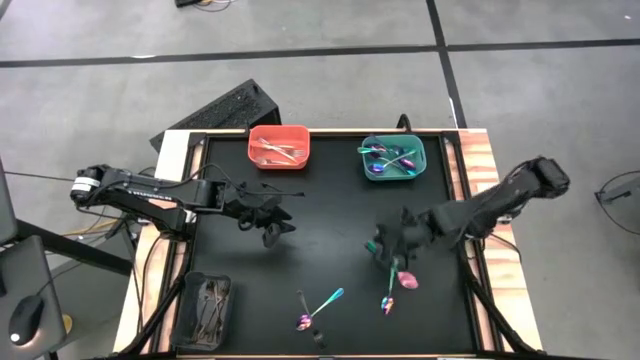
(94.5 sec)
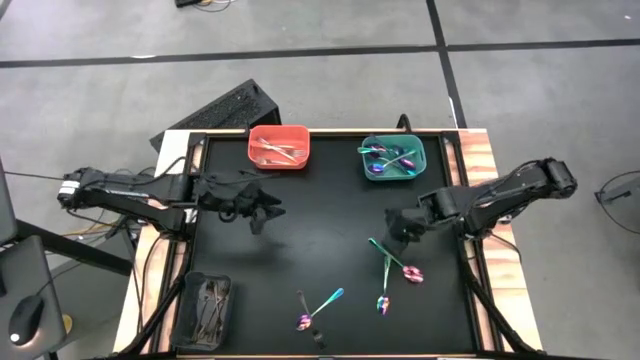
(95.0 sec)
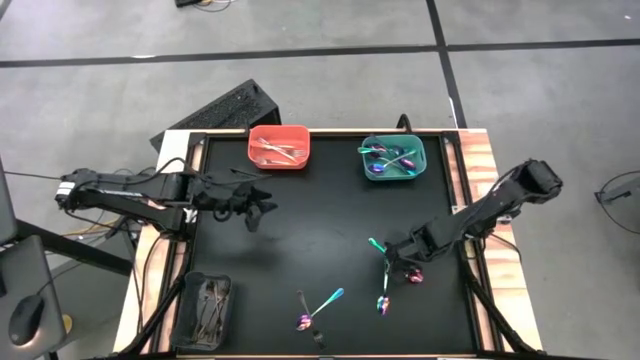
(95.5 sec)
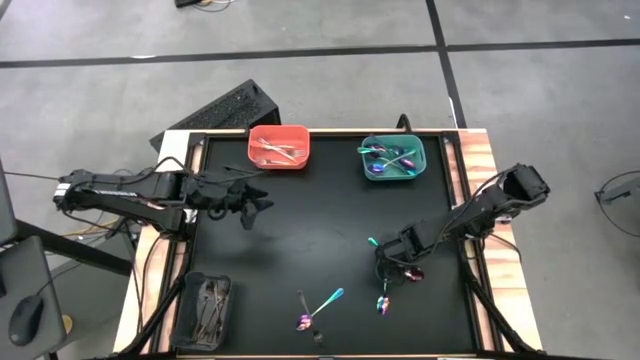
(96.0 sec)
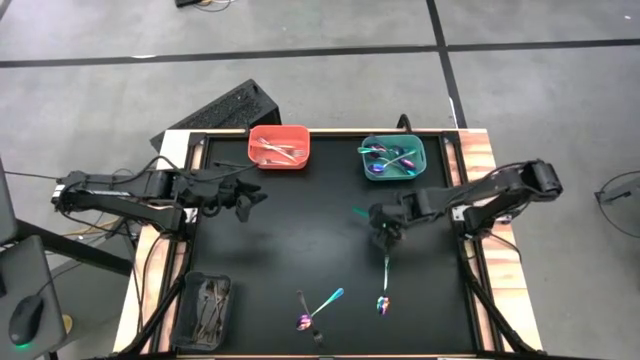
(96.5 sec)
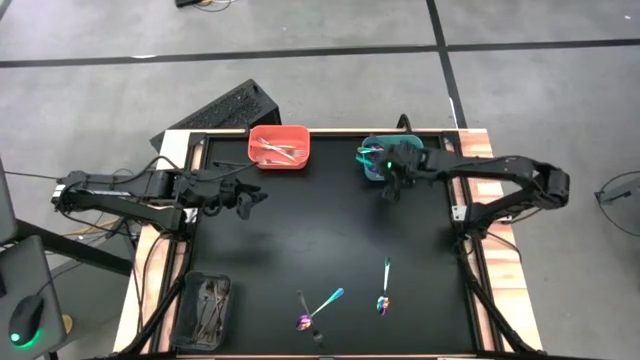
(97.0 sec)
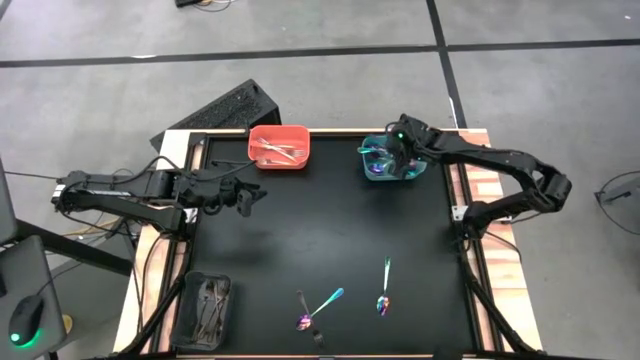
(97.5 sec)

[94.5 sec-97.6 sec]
Task: Sort silverware by color (type)
Put the blue spoon into the blue bin

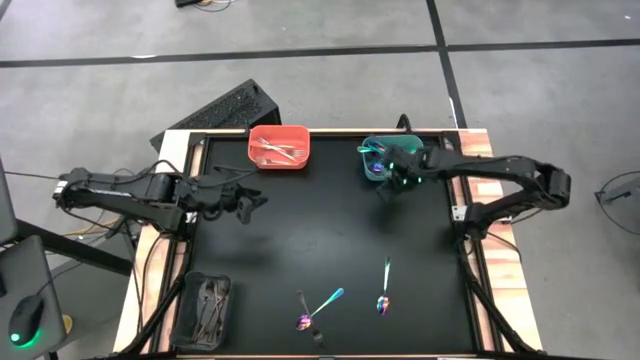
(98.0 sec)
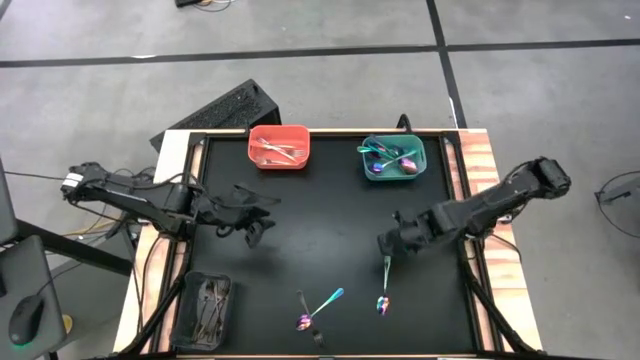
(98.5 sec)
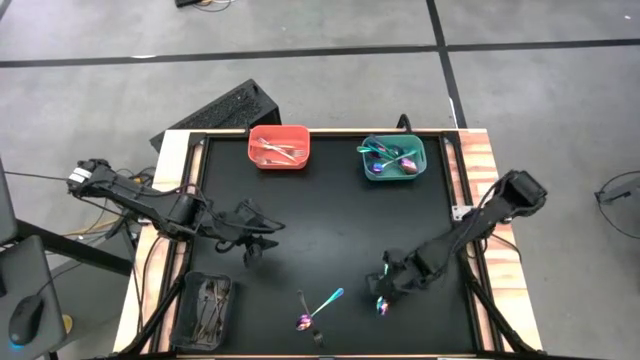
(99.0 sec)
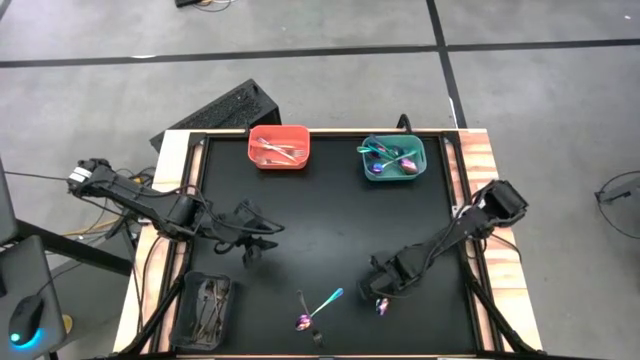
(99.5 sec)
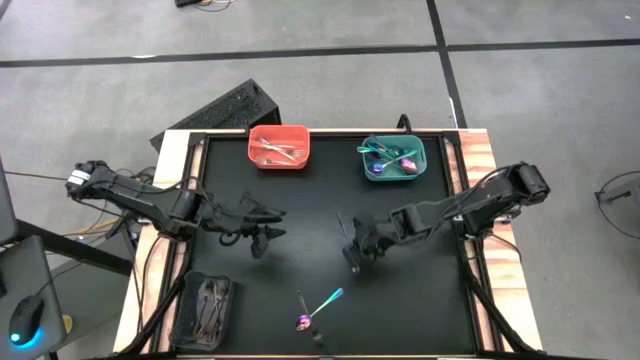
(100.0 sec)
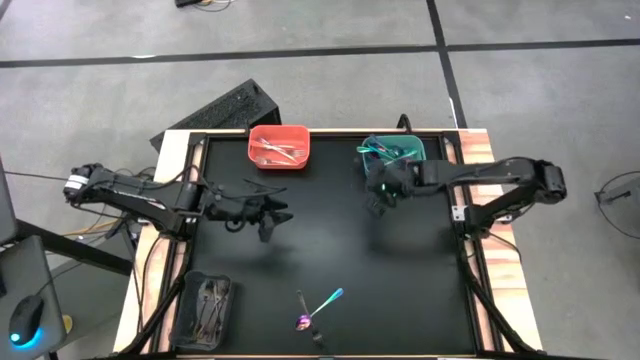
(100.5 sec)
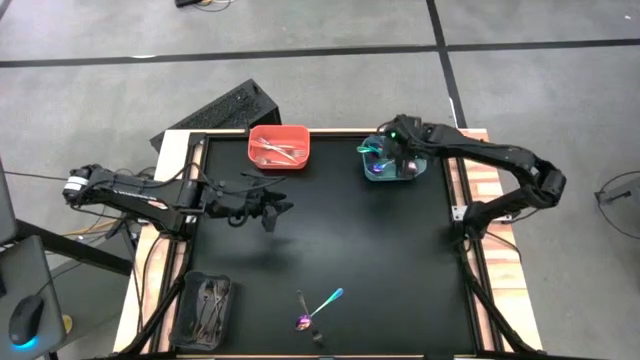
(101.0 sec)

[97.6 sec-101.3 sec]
Put the blue spoon into the blue bin

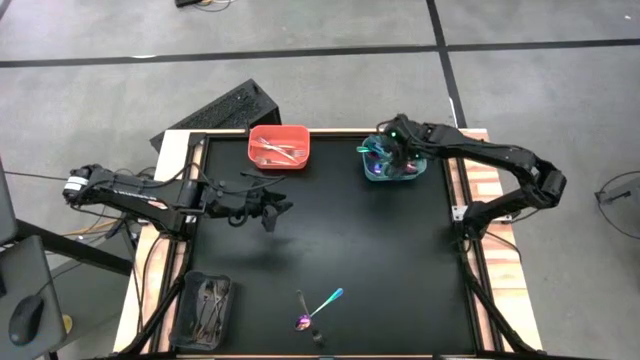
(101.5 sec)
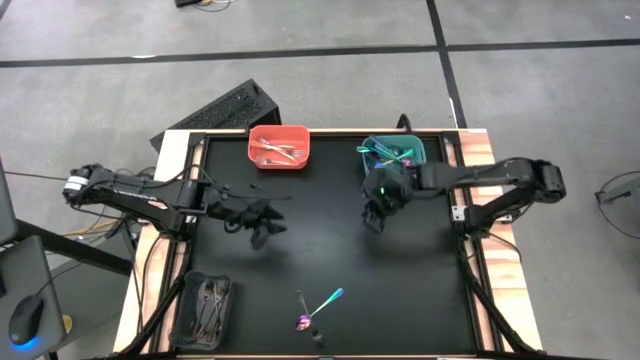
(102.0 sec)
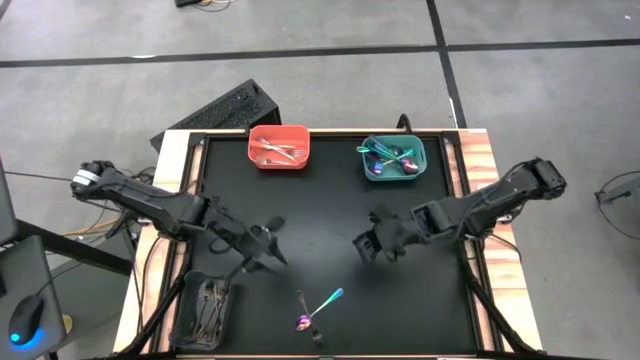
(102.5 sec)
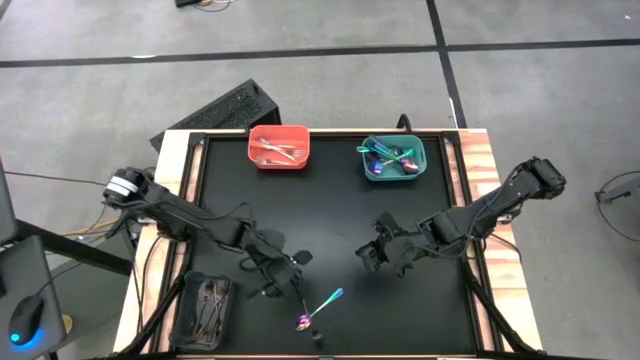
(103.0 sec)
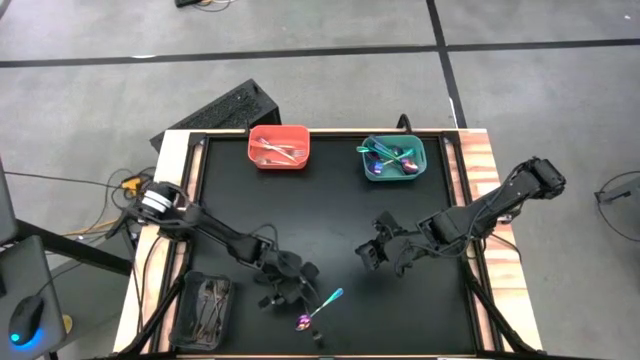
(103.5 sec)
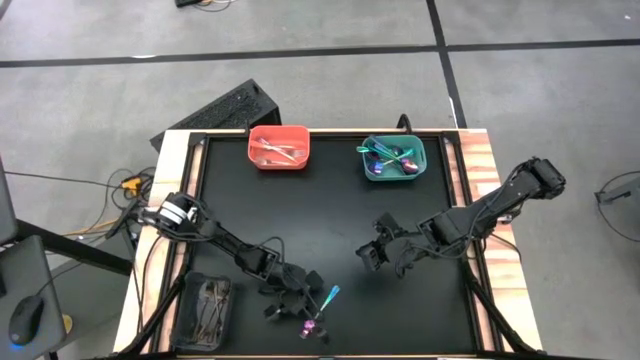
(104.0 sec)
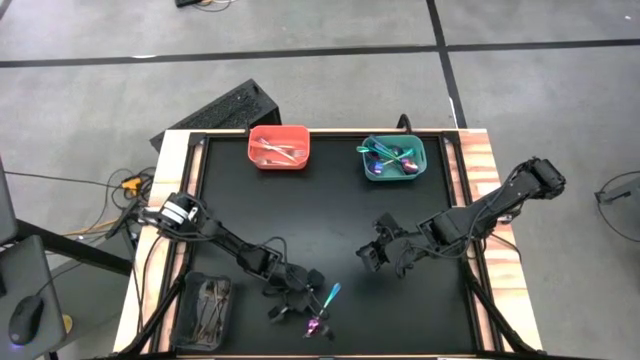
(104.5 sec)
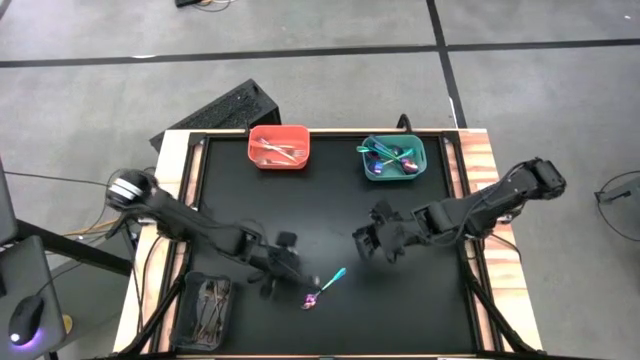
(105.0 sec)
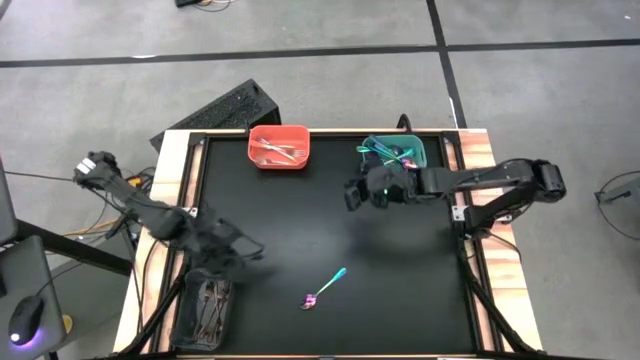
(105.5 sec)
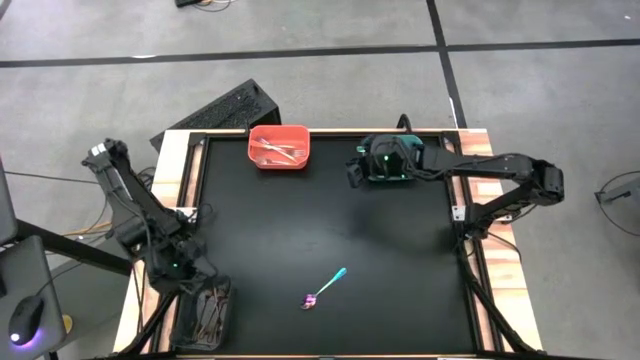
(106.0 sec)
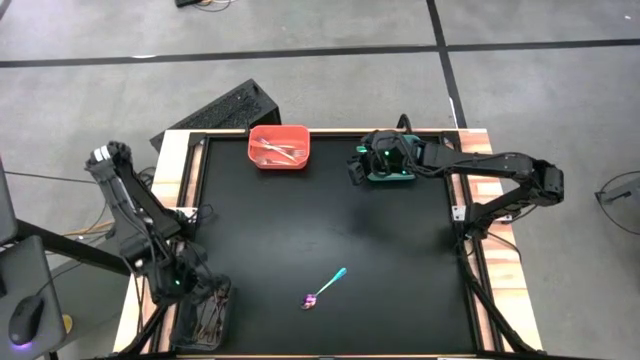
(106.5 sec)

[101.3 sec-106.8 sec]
Put the black fork into the black bin

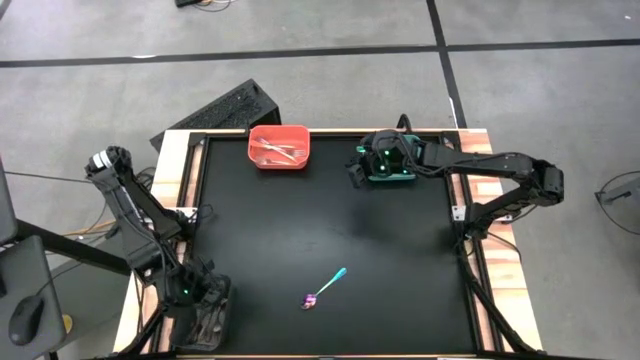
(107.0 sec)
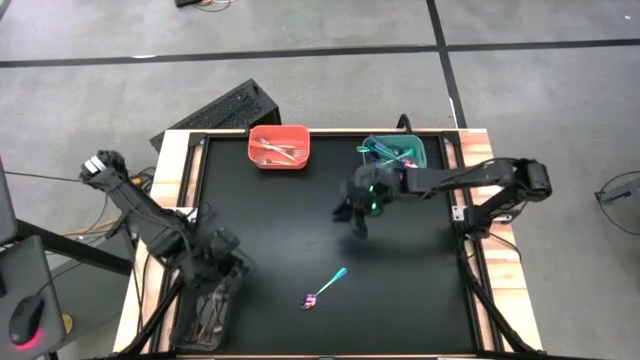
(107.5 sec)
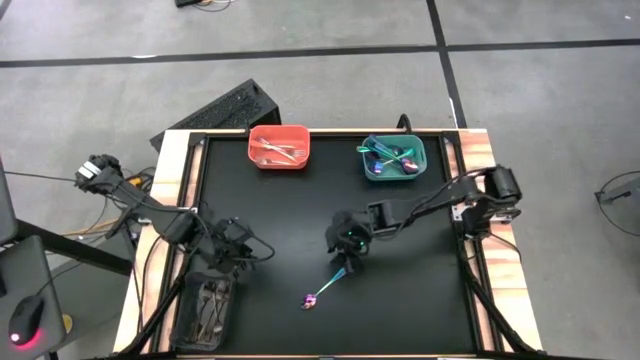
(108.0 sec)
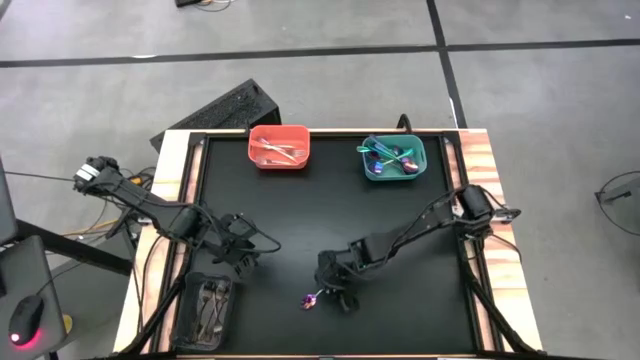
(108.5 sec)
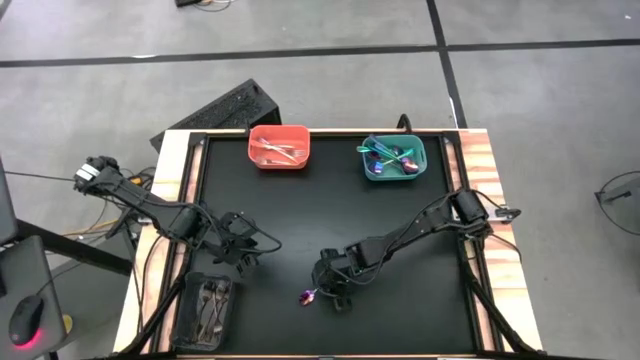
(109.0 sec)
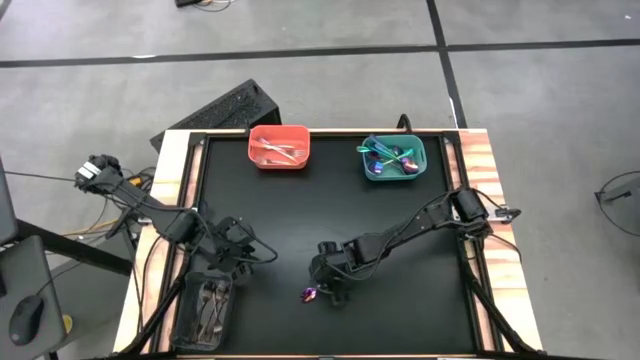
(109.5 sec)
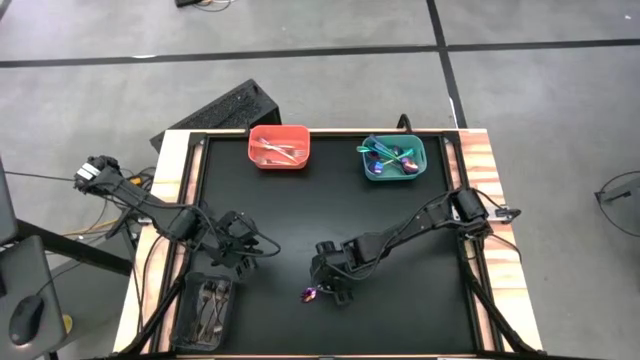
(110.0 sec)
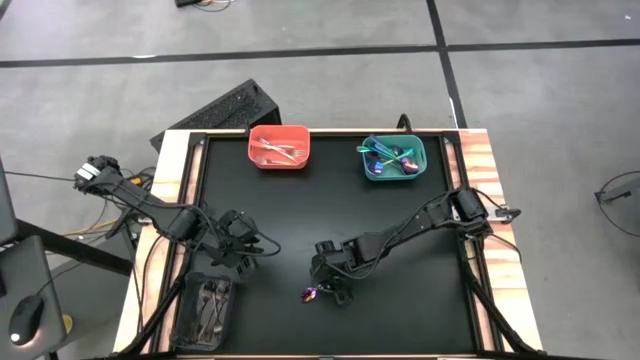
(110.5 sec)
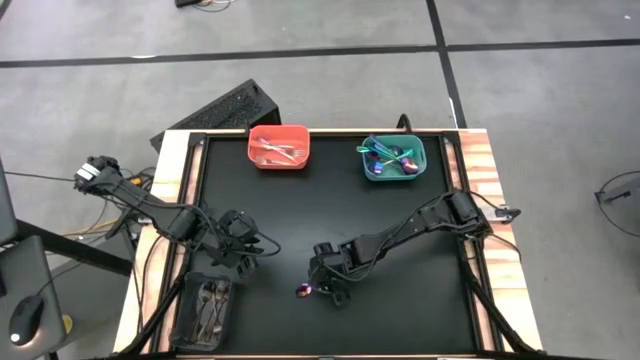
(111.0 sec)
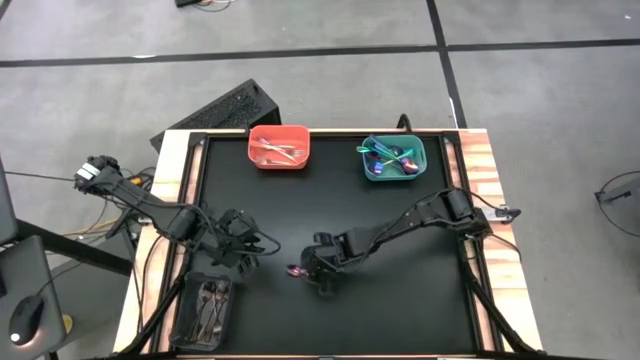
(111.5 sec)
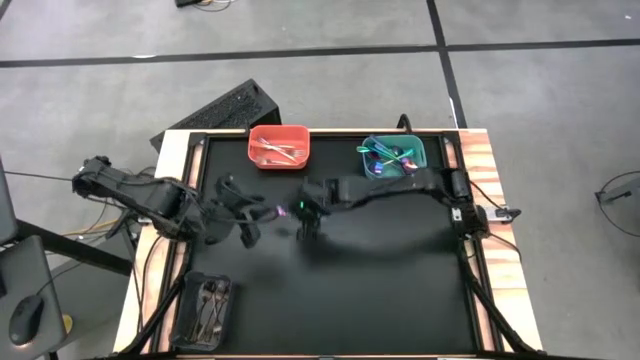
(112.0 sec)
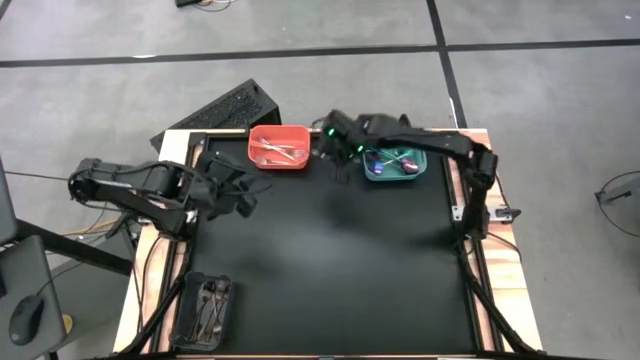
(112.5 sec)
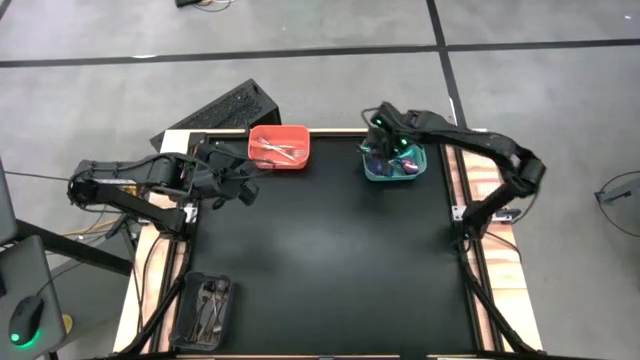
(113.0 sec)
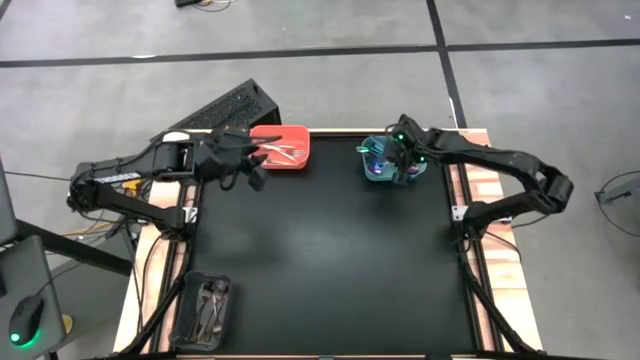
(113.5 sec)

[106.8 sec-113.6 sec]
Put the blue spoon into the blue bin

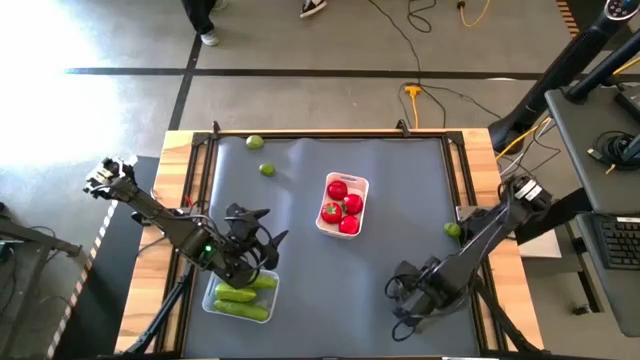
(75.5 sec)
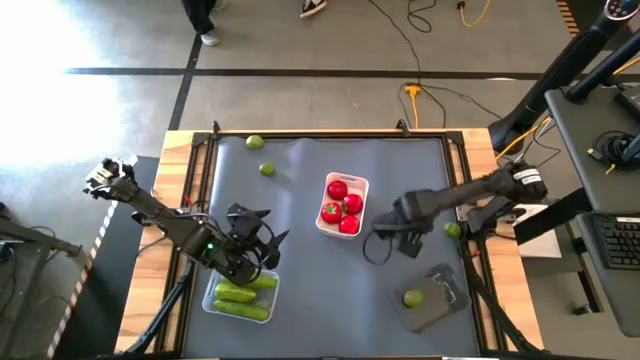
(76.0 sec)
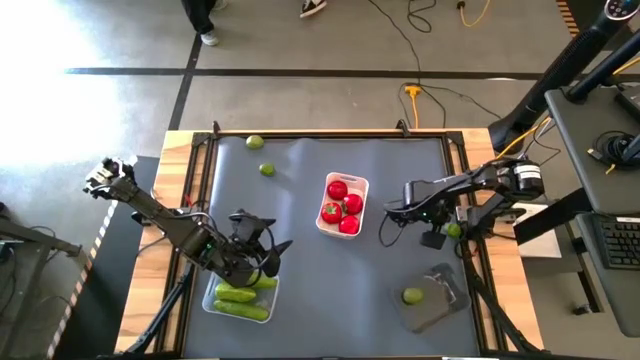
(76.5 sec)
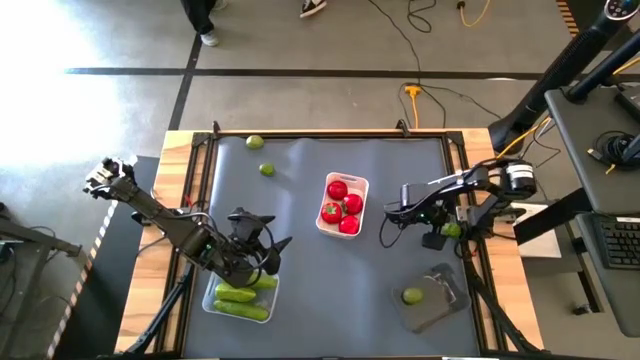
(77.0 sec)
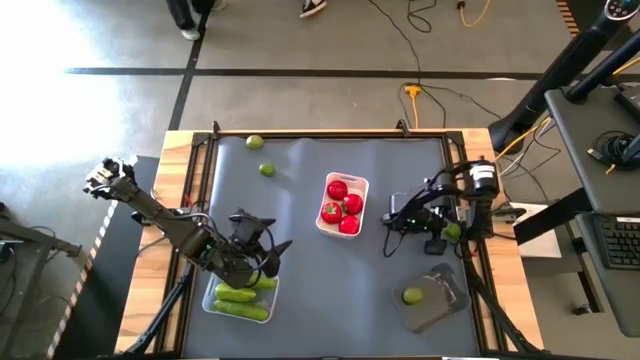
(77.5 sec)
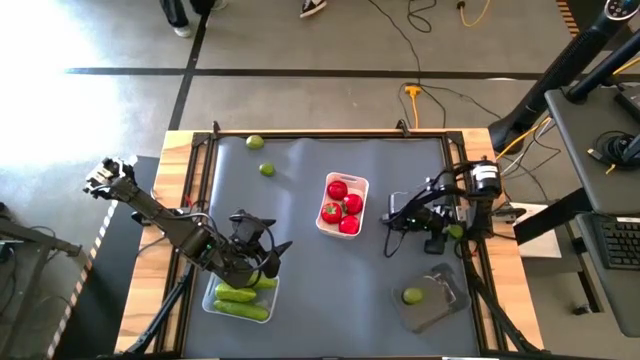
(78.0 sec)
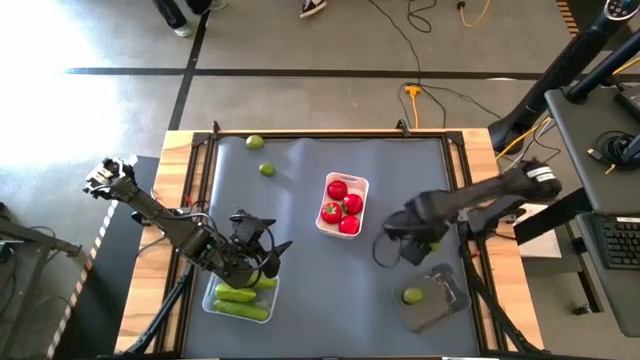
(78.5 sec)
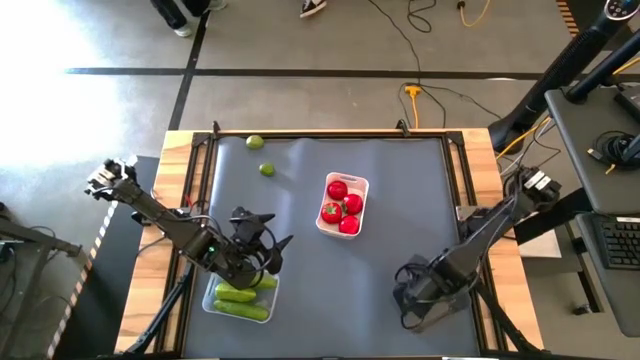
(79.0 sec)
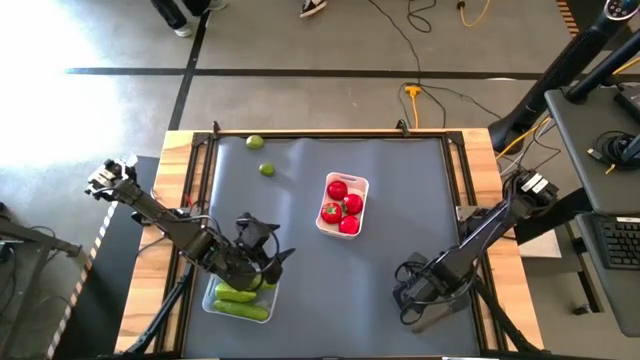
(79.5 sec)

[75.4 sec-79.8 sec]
Task: Sort produce into baskets
Put the bottom right lime into the black transparent bin
